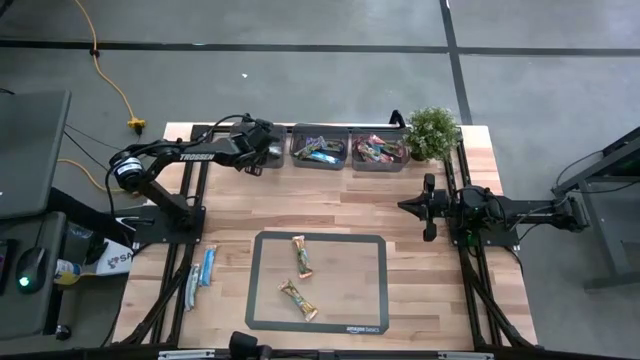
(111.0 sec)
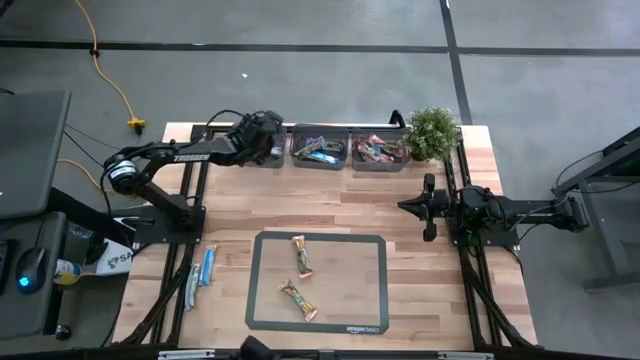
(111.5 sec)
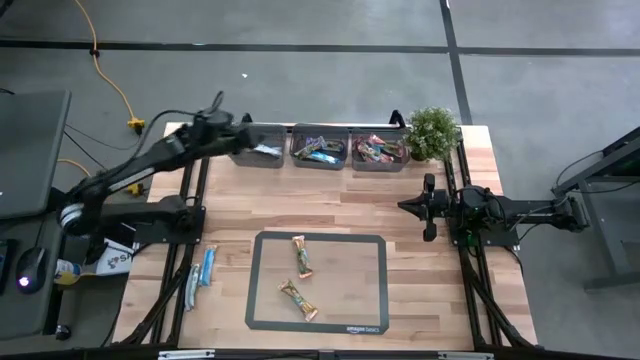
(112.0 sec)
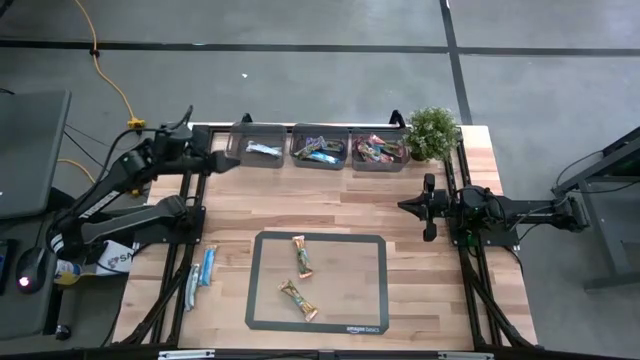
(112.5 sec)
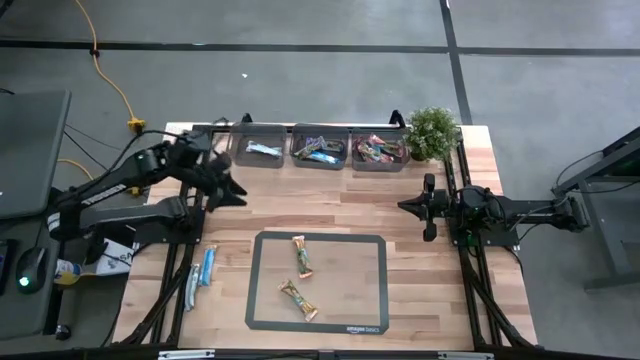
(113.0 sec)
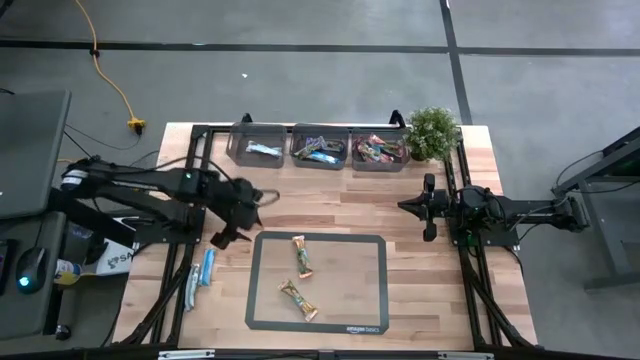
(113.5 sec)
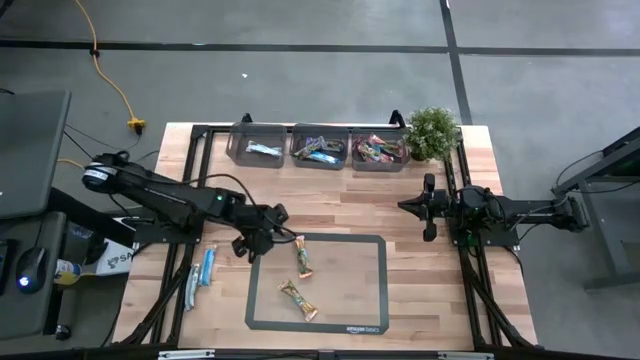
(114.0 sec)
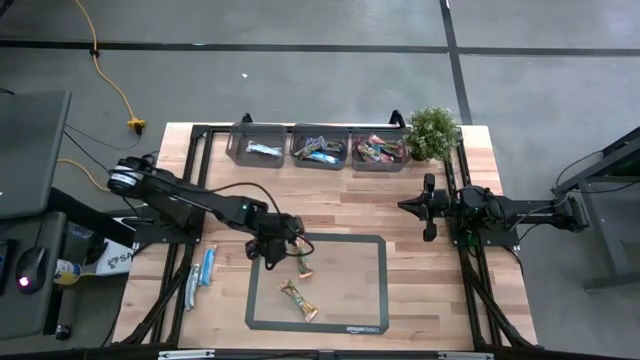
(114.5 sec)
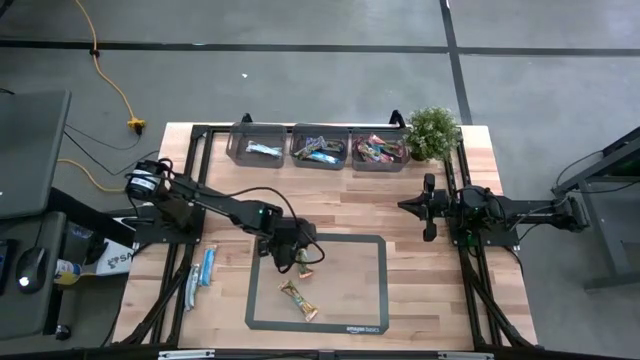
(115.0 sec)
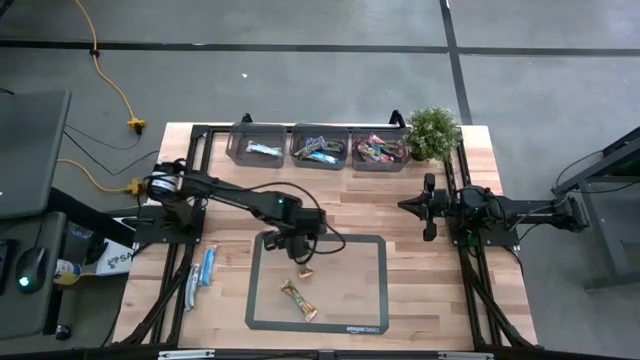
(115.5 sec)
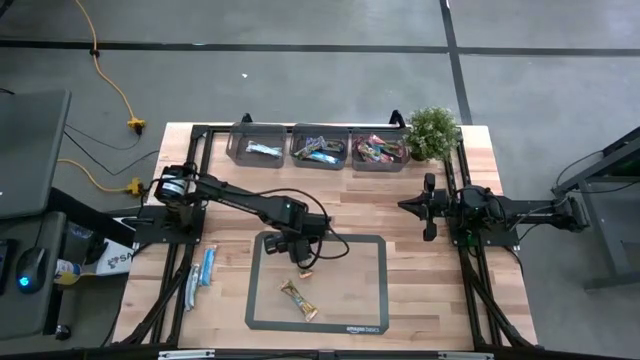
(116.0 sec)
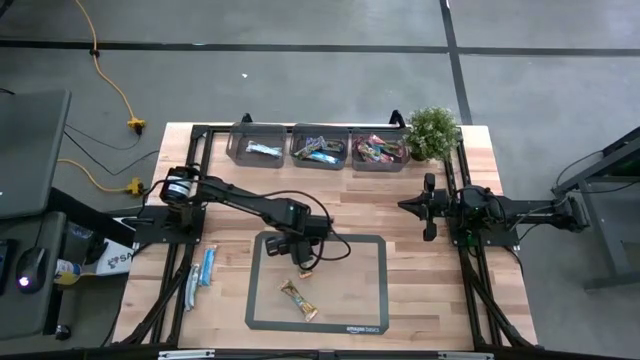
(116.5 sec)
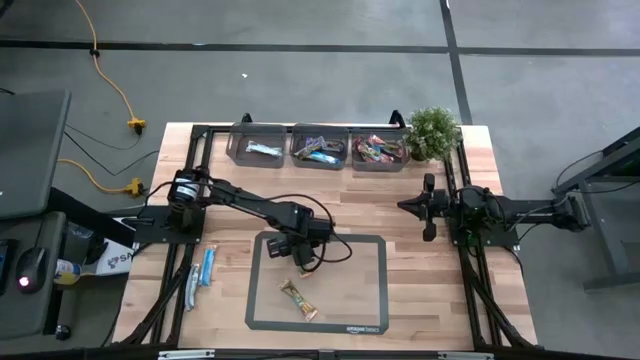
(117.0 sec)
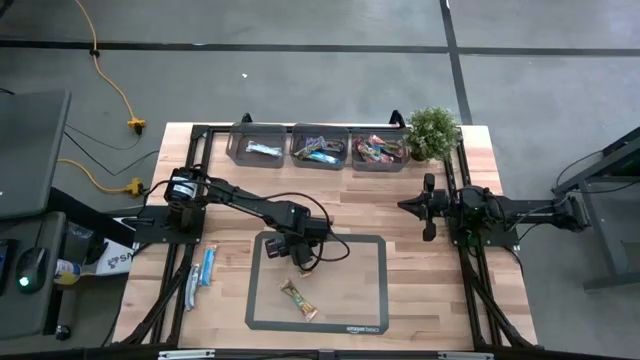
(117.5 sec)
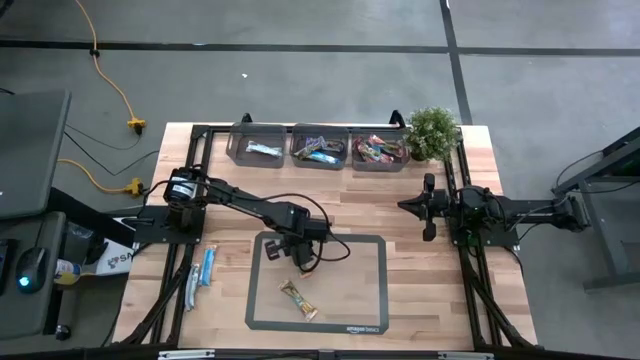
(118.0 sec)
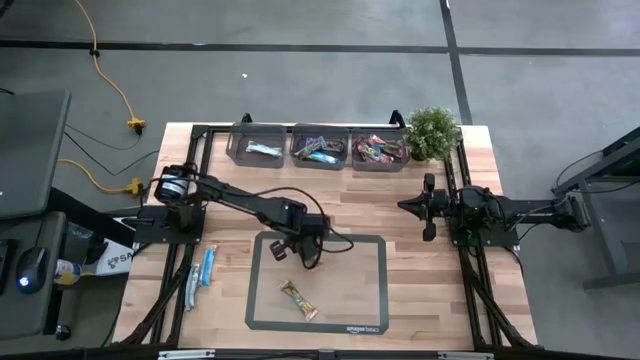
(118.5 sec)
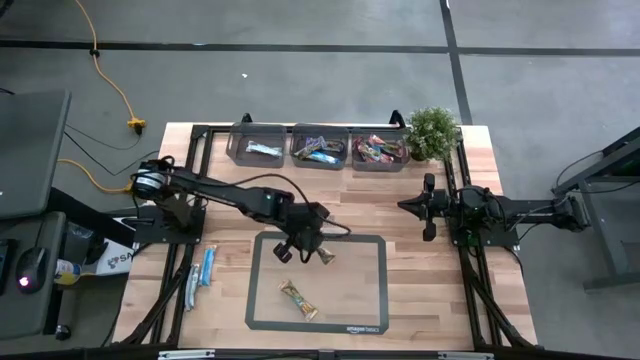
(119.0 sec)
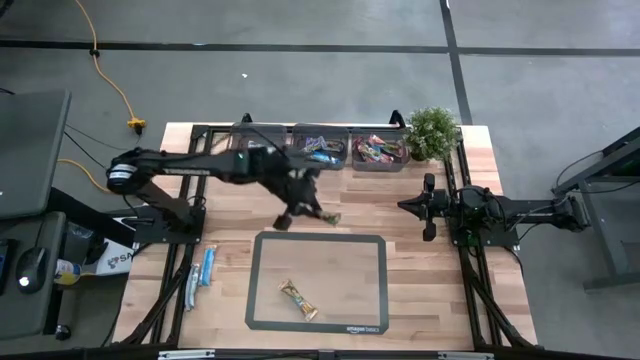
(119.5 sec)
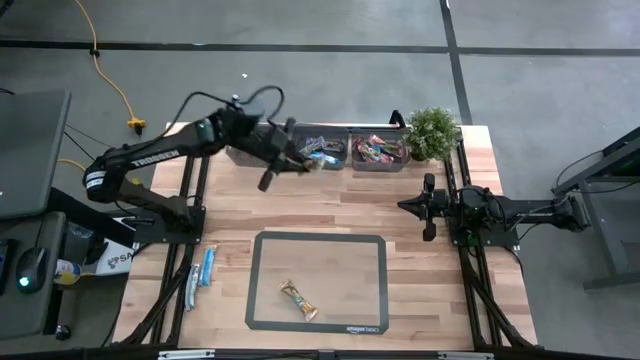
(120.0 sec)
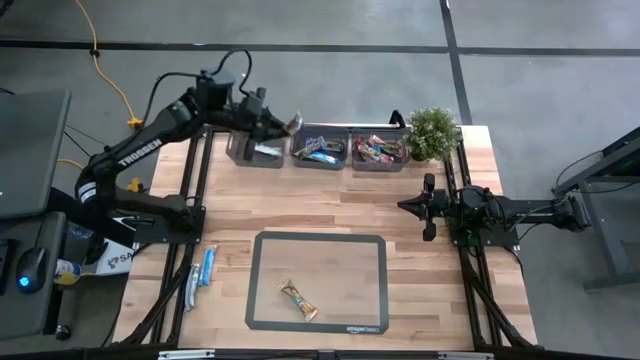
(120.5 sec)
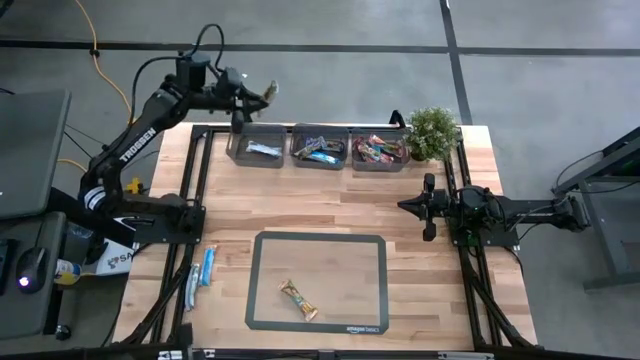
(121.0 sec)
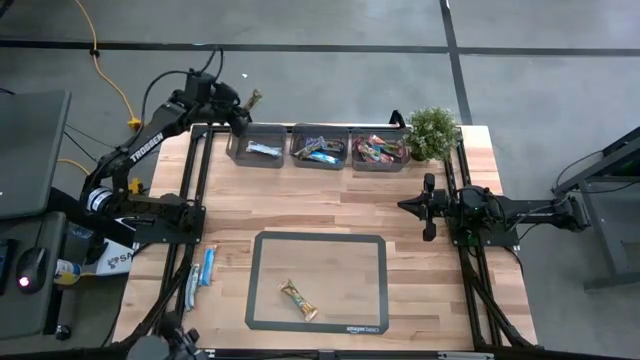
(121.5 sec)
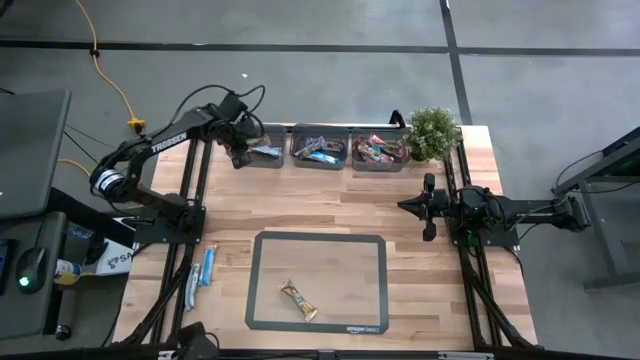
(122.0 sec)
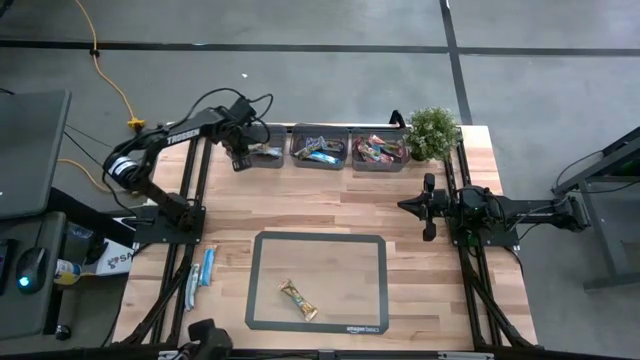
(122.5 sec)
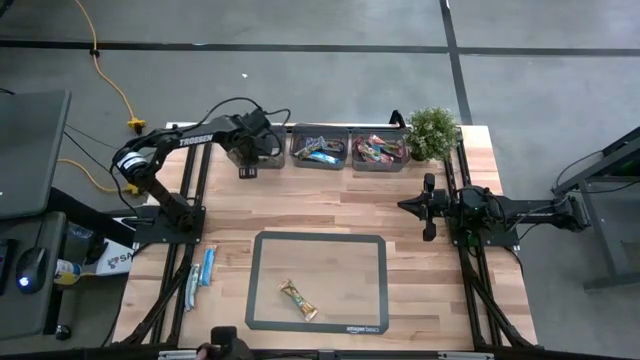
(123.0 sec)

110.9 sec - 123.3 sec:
Task: Pick and place Granola Bars by type
Put the orange granola bar into the left black bin

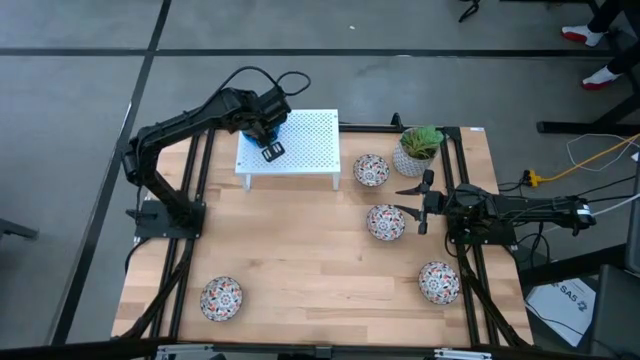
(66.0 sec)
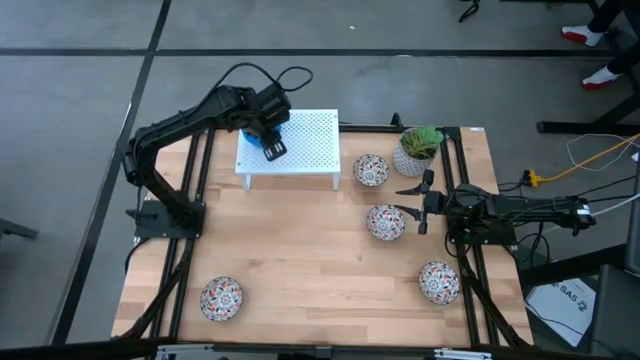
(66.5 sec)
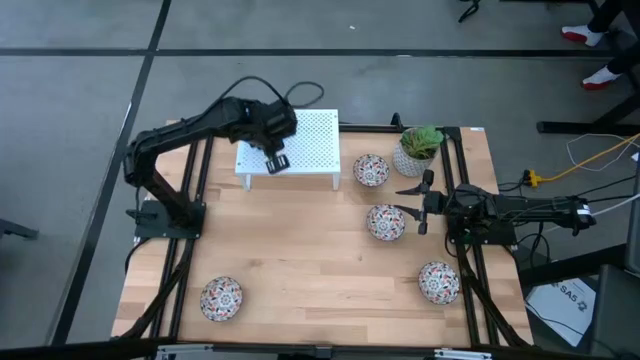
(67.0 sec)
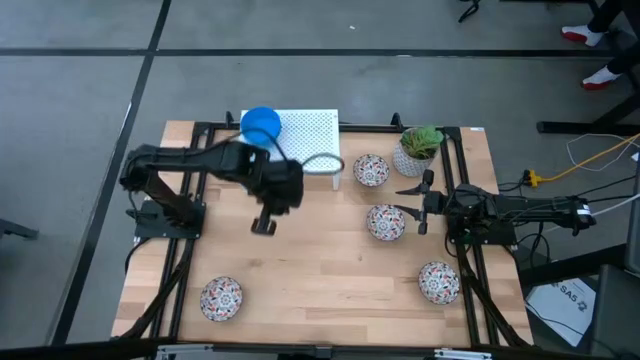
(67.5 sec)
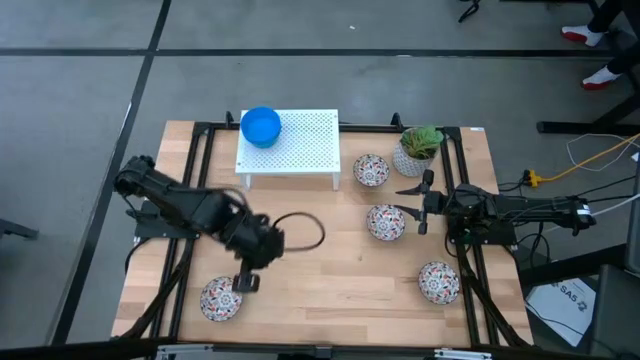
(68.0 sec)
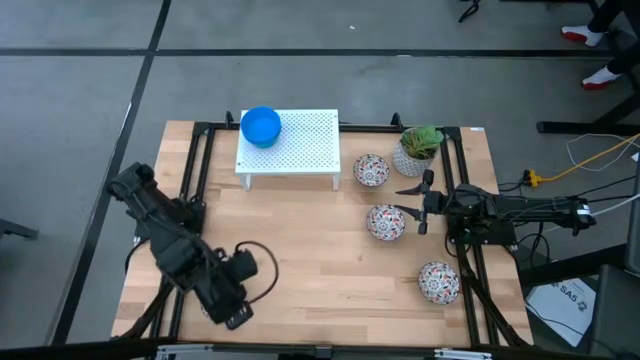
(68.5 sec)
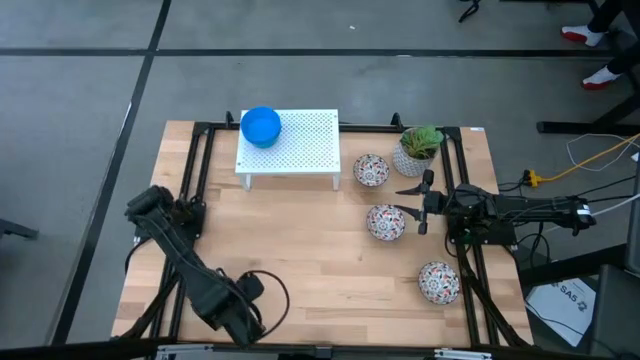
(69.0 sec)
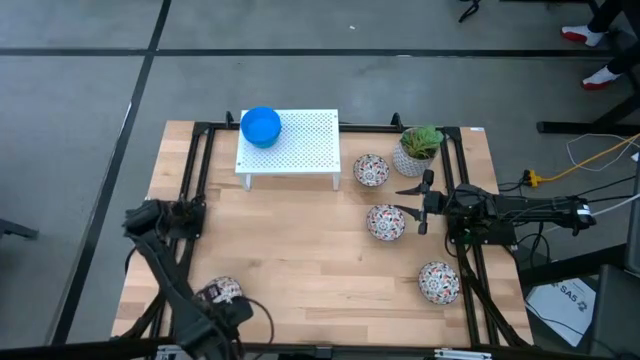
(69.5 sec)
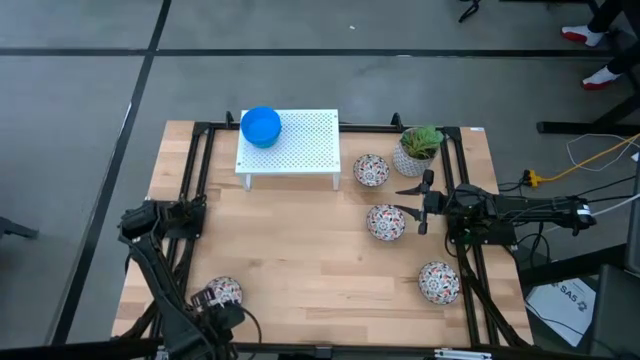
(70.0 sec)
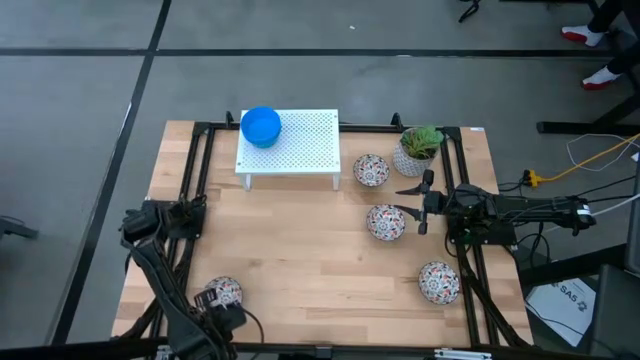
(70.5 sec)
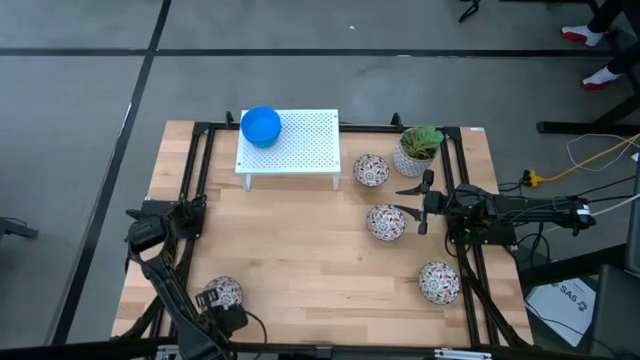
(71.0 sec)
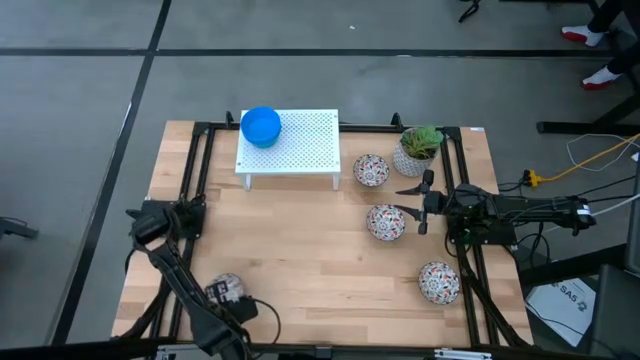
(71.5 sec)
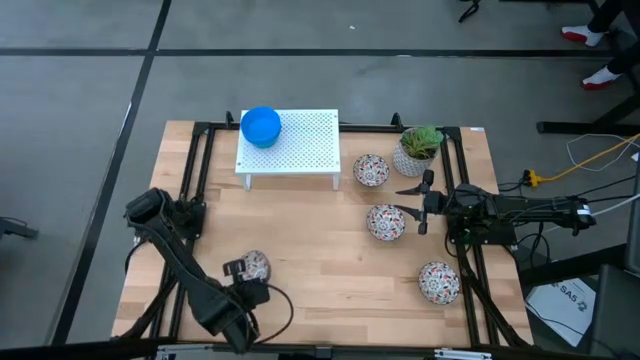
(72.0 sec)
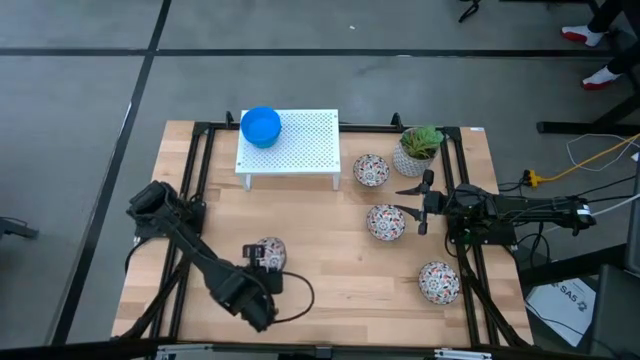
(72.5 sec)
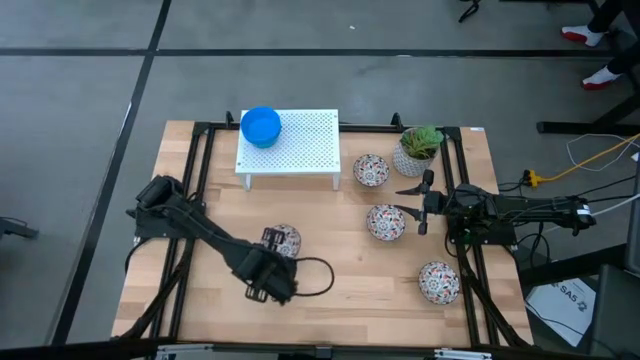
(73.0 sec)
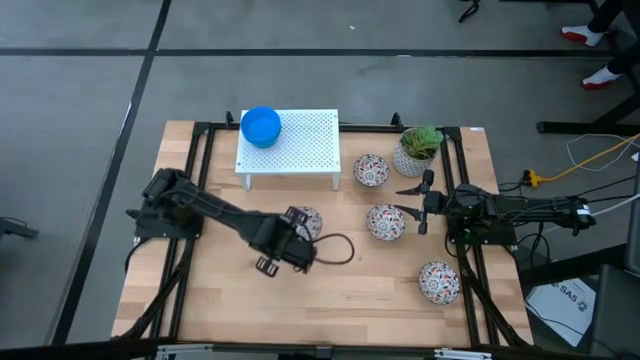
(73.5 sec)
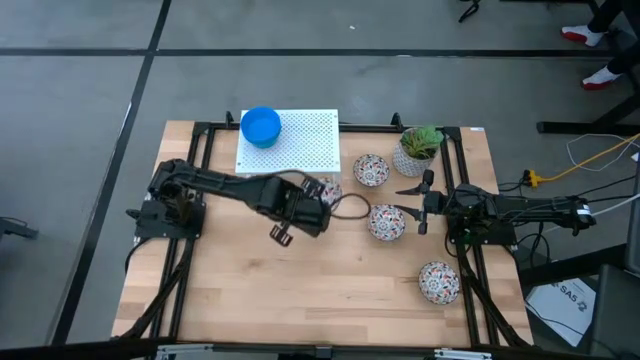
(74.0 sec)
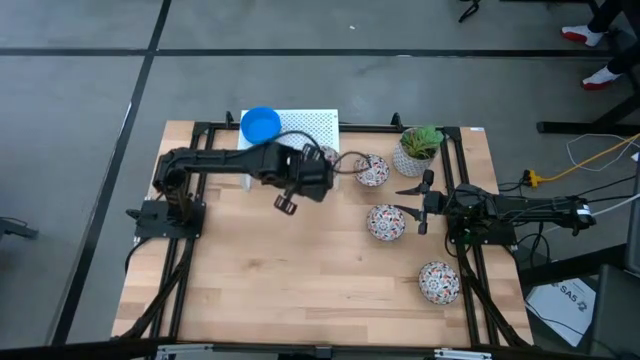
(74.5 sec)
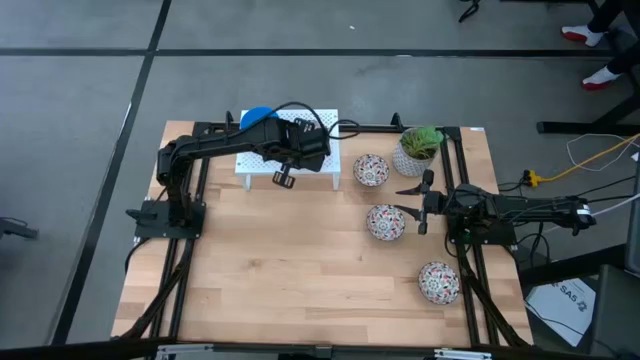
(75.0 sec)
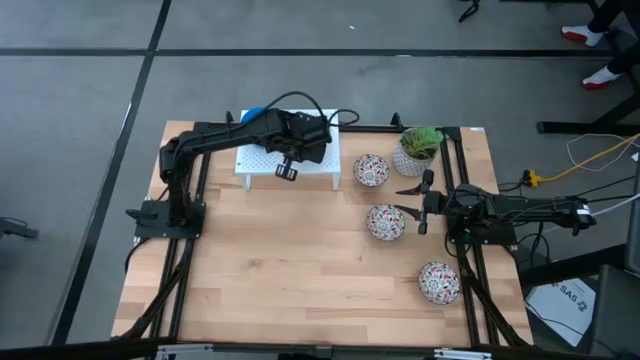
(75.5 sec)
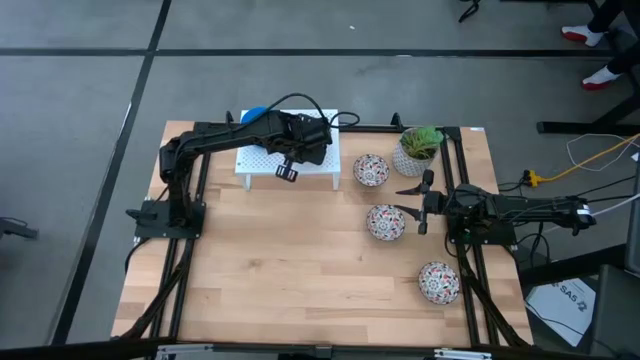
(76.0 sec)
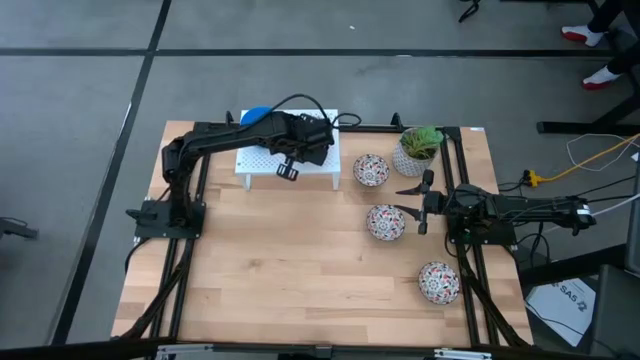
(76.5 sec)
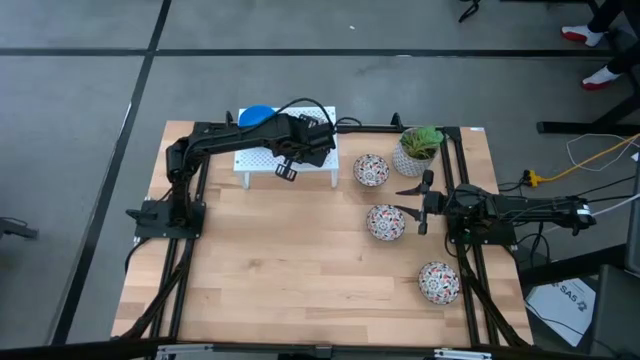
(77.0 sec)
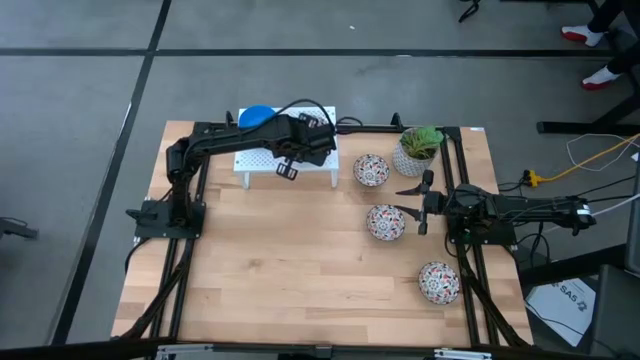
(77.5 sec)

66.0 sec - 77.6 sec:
Task: Pick & Place Mini bowls
Put the patterned black bowl on the shelf
